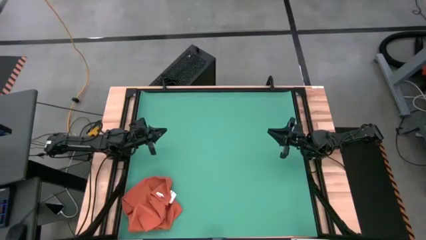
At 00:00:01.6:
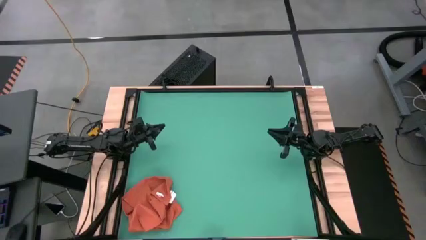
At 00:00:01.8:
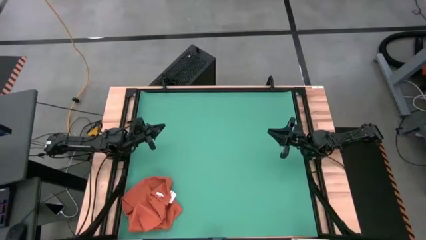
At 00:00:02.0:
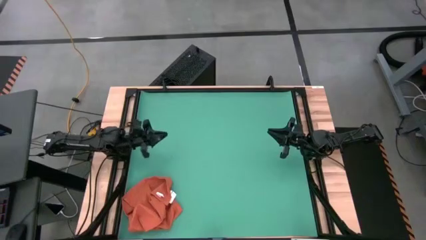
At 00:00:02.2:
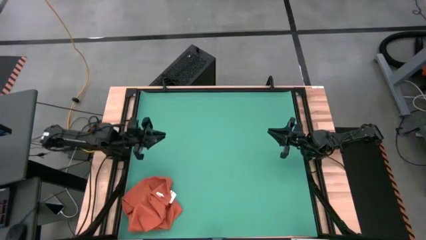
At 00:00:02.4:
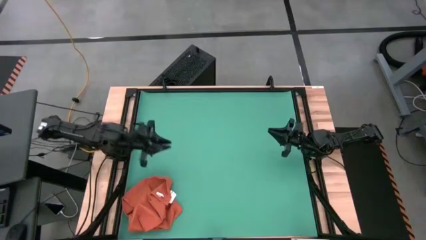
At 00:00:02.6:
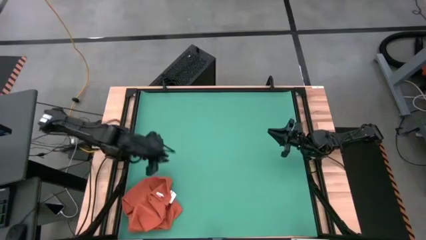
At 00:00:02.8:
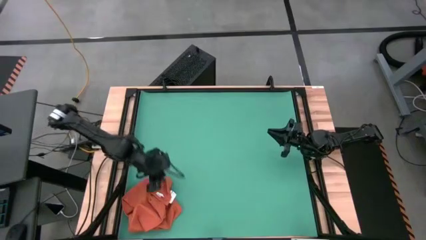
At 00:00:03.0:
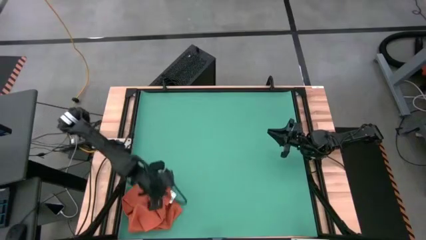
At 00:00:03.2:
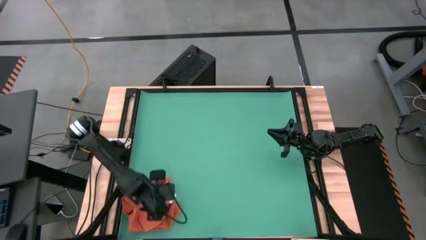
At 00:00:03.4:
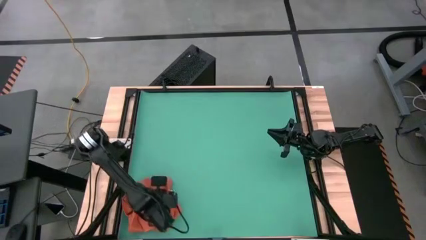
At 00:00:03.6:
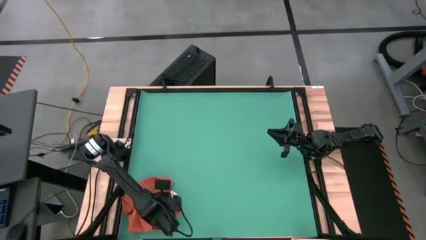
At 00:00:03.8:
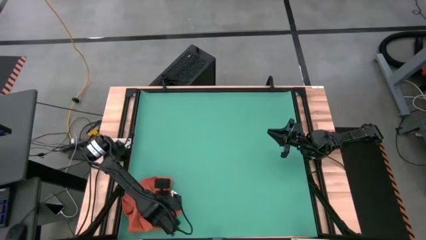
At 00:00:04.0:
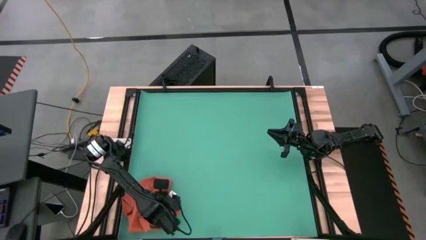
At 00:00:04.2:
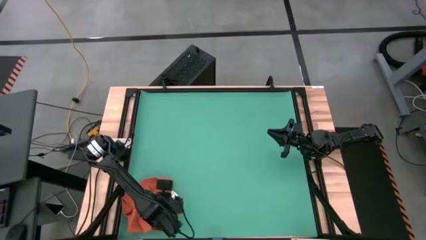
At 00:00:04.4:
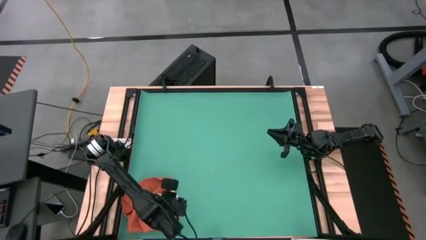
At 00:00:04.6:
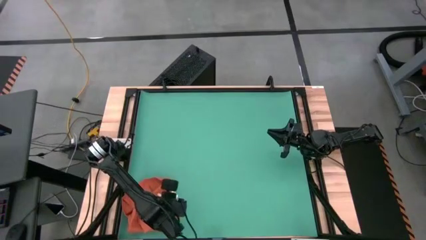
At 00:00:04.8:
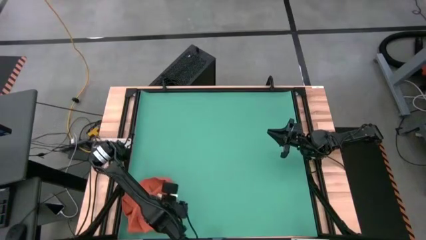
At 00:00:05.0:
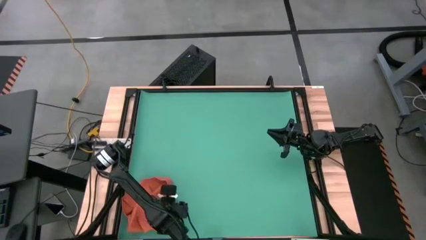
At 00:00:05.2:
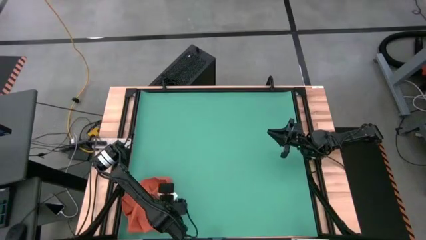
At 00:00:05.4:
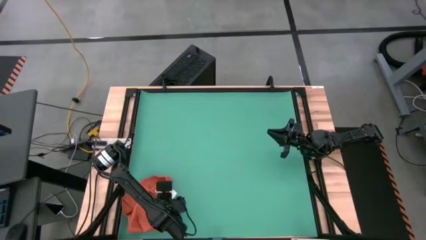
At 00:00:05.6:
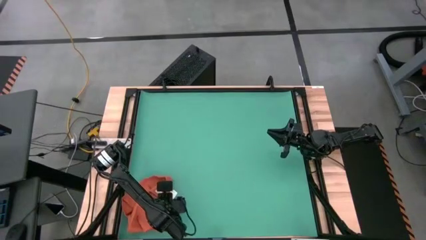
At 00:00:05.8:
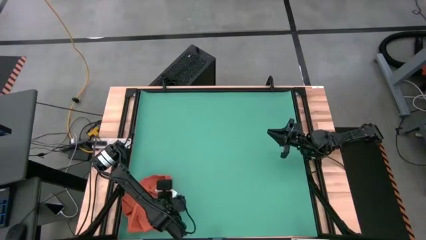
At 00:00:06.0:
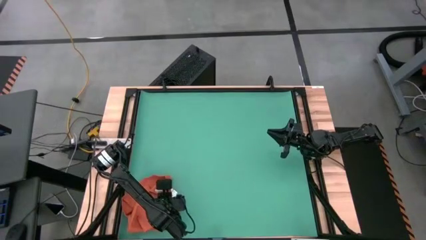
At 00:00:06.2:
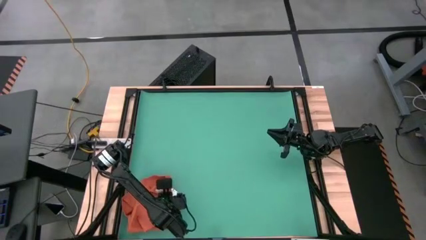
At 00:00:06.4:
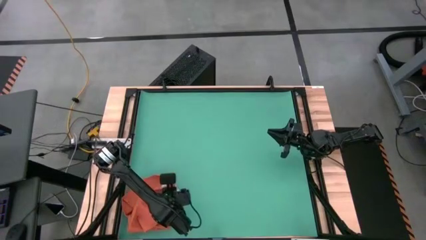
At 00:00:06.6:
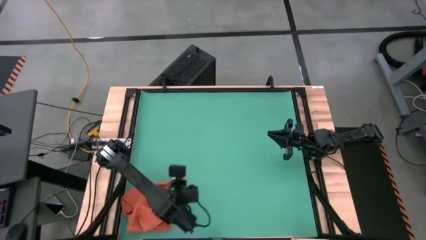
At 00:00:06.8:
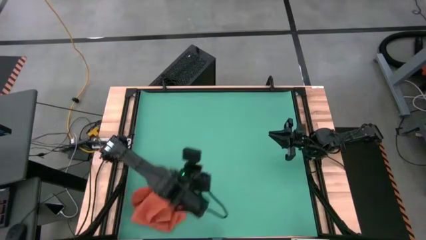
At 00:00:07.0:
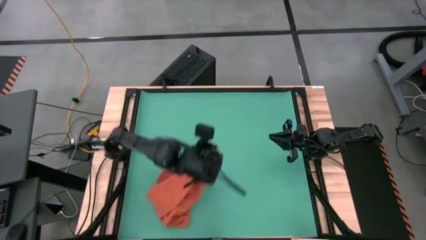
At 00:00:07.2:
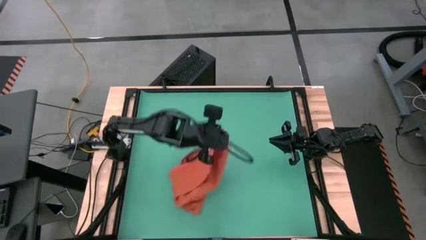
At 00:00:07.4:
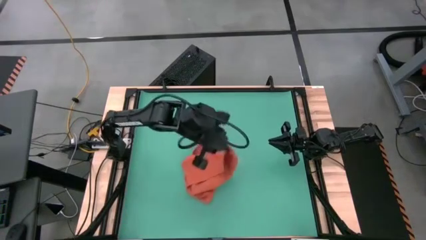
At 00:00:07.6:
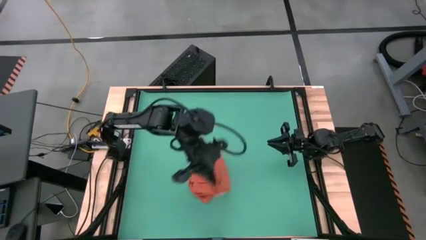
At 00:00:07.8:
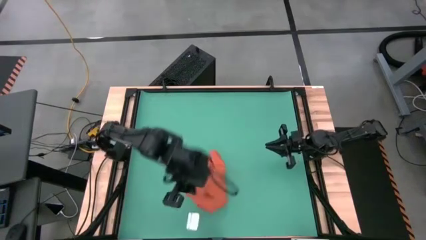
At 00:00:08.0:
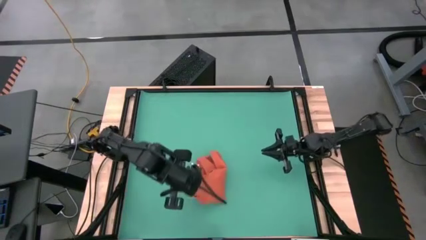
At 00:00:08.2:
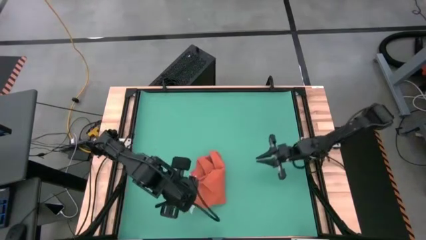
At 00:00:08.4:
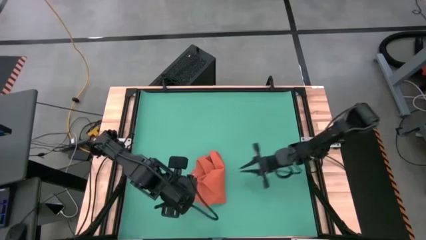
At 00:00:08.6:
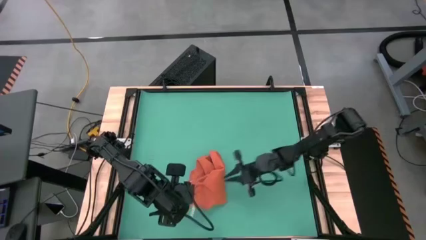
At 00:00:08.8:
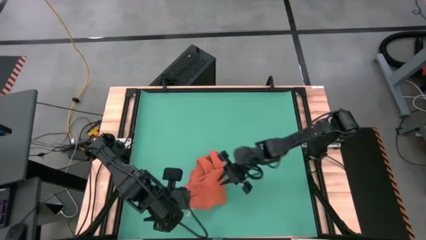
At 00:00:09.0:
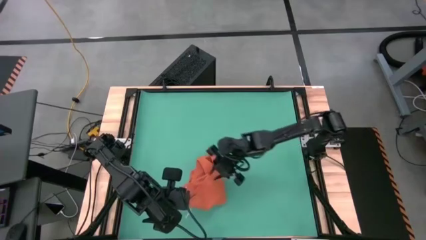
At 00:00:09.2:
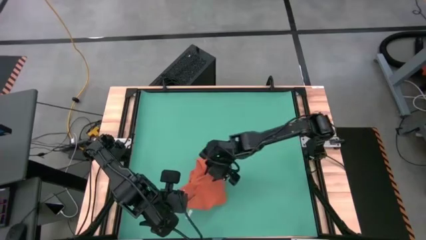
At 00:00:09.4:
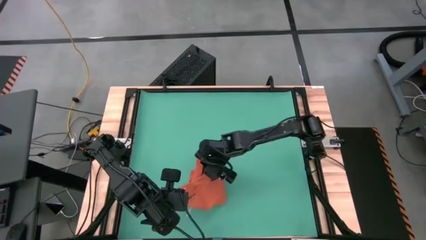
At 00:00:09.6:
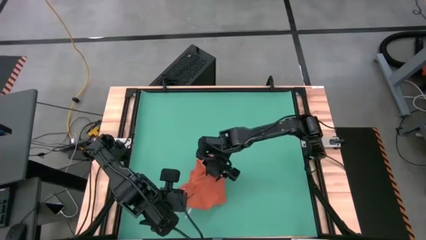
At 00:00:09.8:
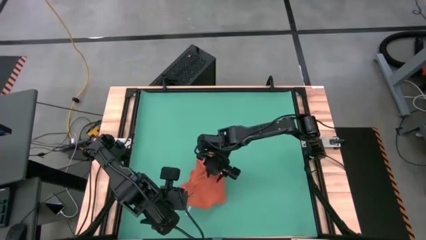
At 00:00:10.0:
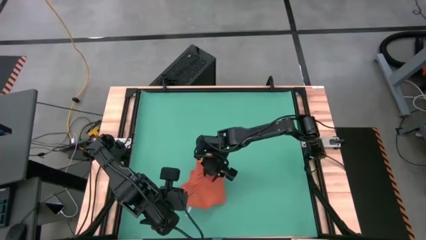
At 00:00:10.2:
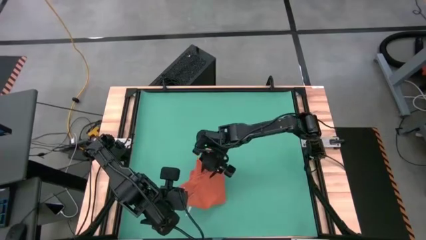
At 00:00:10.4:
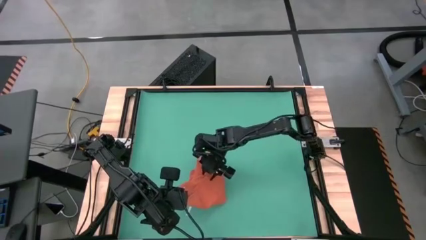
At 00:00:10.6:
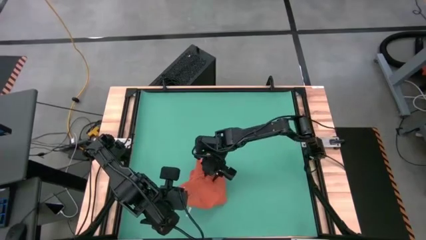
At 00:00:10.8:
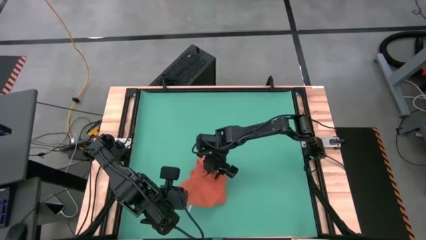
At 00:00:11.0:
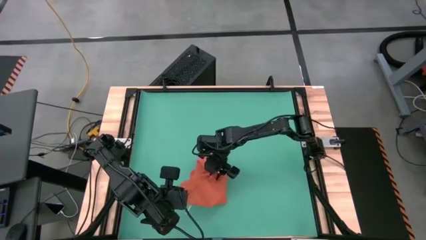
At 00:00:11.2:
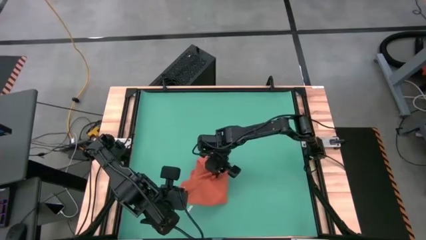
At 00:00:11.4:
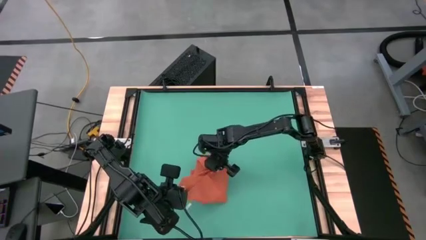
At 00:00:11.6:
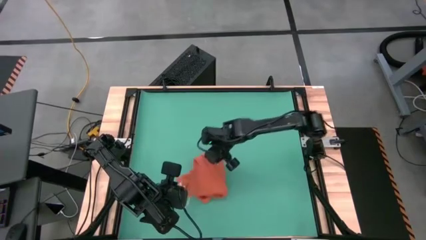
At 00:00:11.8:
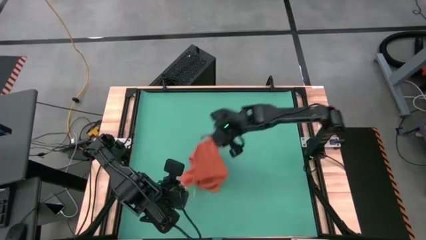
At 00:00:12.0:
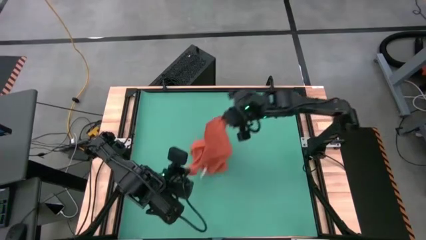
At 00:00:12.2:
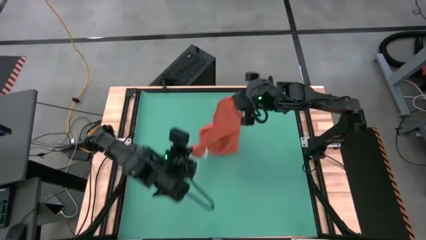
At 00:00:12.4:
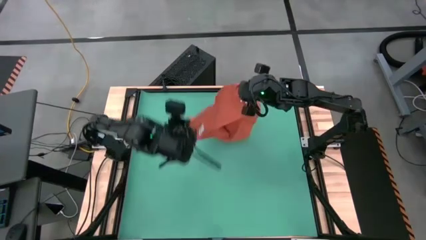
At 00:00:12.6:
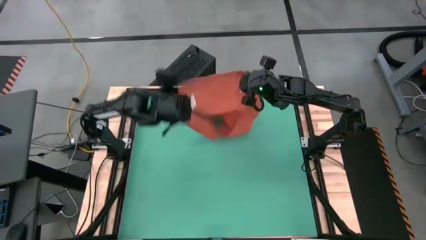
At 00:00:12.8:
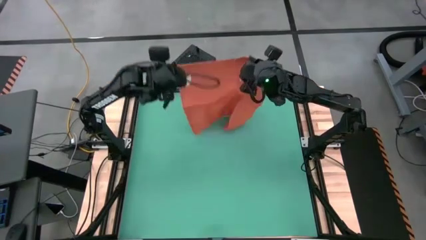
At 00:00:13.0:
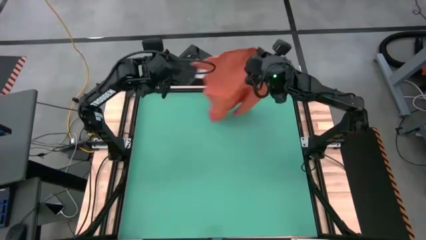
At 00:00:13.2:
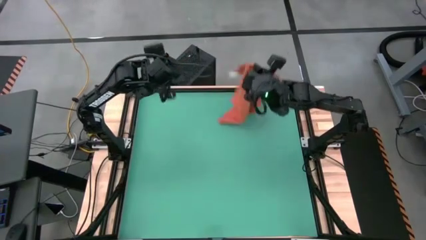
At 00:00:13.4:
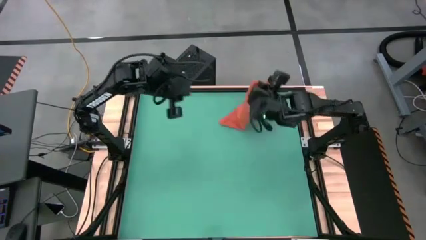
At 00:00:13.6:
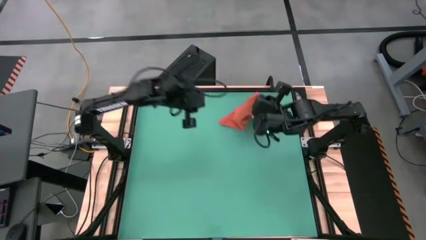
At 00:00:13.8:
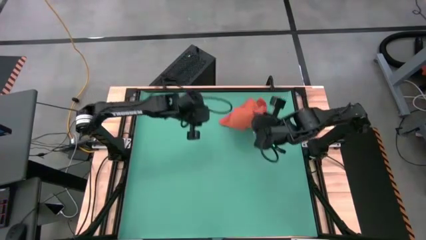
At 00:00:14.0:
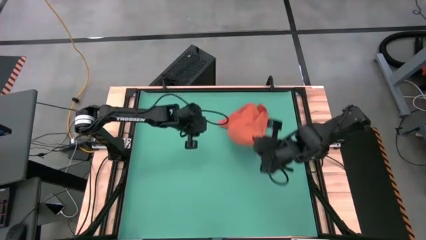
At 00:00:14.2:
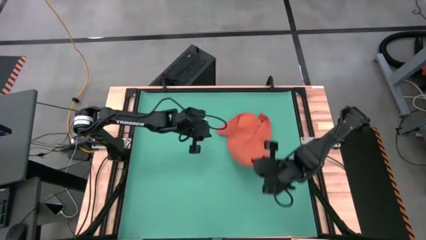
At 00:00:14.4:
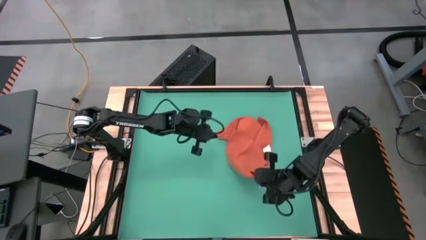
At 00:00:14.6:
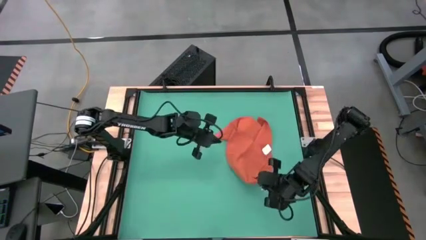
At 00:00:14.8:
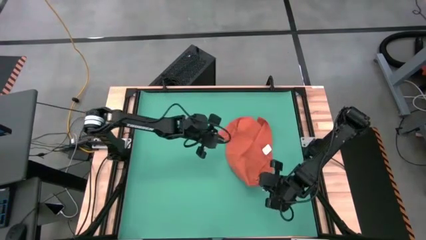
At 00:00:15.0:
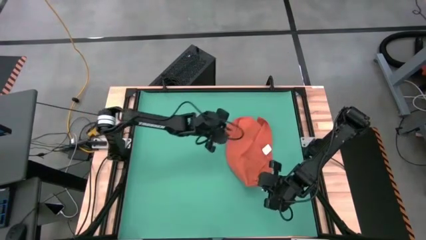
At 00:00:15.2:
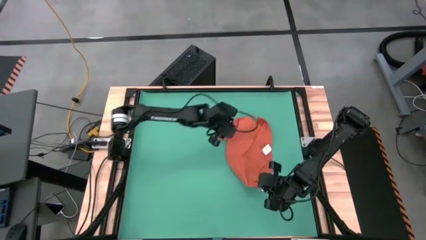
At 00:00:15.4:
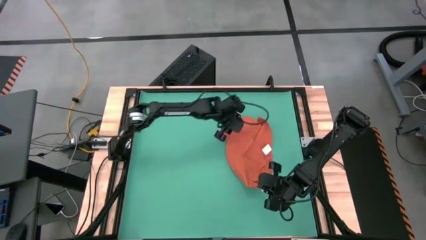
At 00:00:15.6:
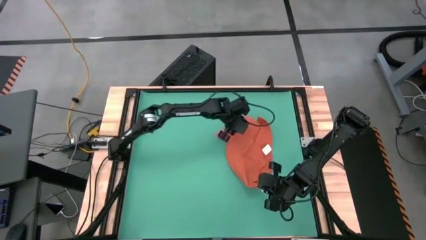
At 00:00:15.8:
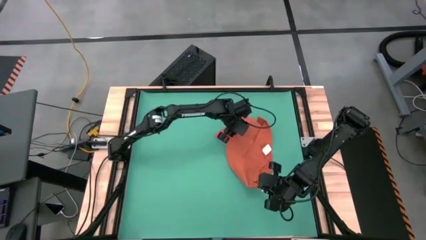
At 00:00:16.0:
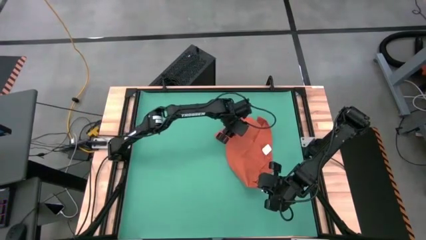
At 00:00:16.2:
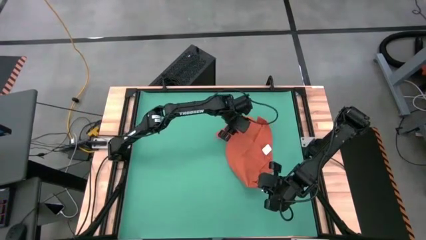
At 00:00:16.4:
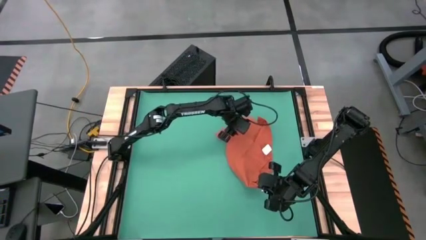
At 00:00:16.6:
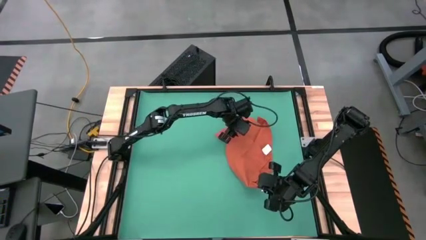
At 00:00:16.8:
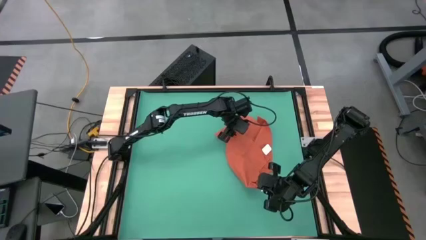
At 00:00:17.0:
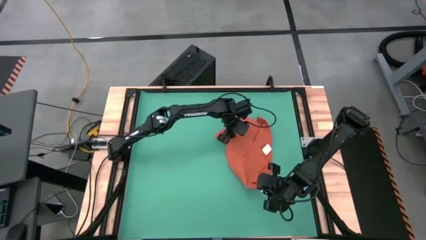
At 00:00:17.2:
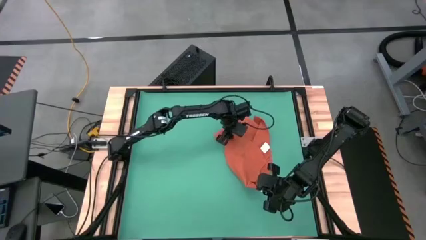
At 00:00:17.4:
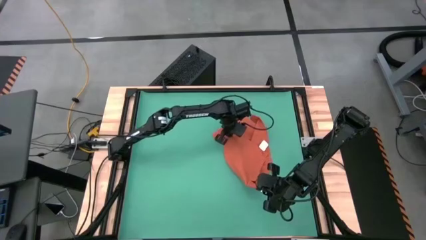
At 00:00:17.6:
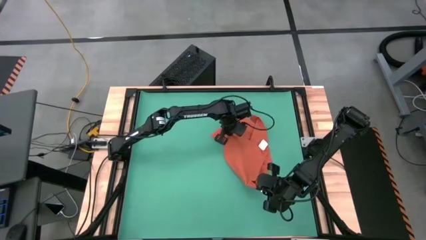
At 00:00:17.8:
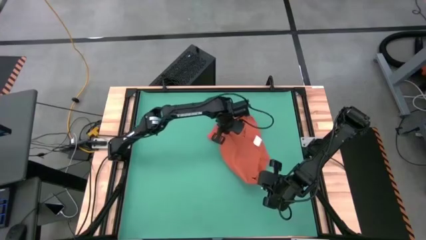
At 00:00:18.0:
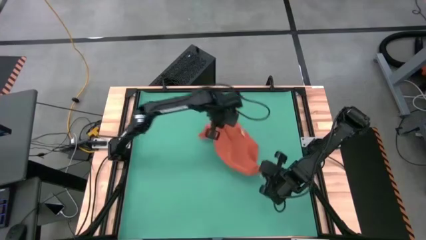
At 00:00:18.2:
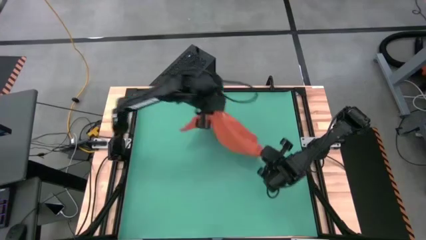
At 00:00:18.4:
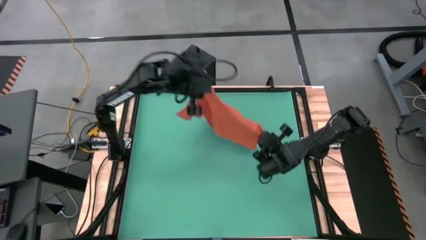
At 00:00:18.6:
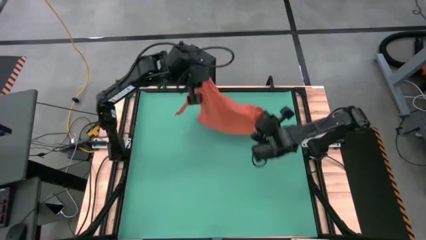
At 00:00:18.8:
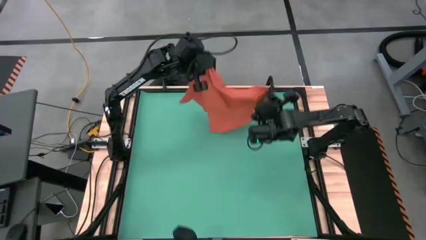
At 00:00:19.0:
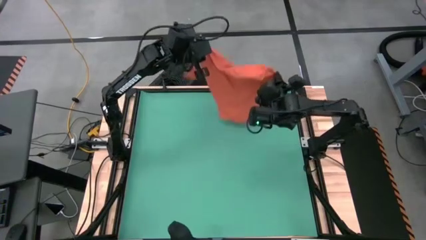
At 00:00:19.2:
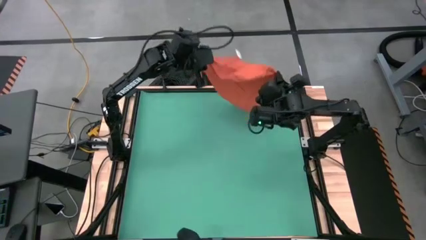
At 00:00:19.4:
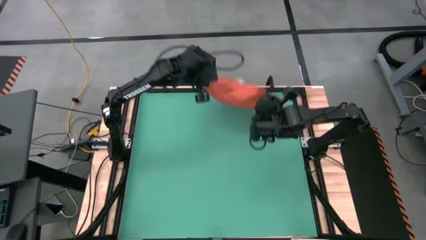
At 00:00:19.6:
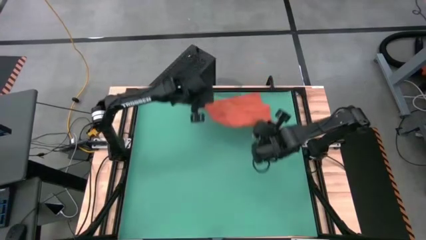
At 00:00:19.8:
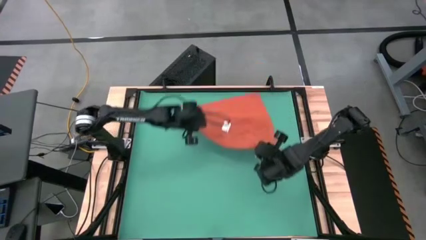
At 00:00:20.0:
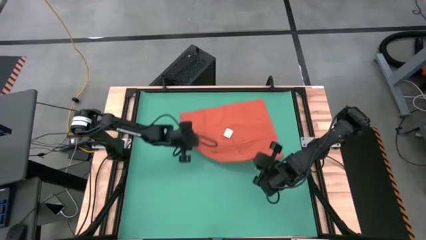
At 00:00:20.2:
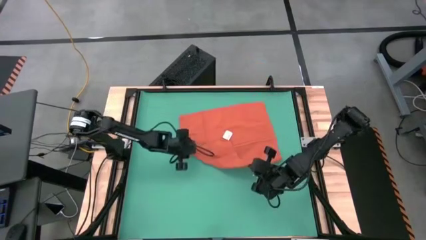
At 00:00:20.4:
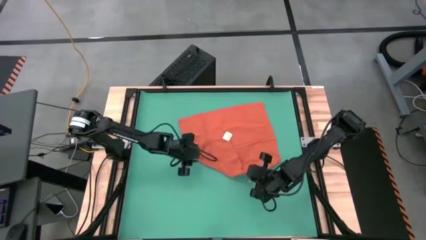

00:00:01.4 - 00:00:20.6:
Task: Roll towel
Roll the orange microfiber towel
